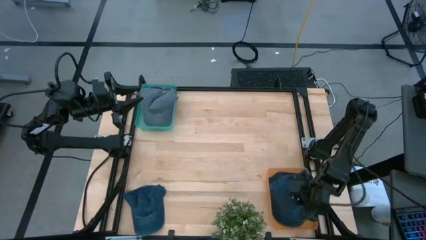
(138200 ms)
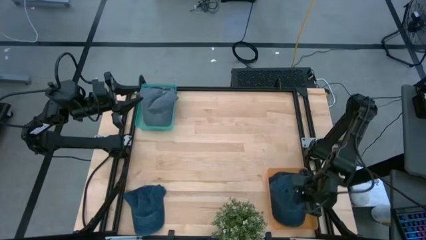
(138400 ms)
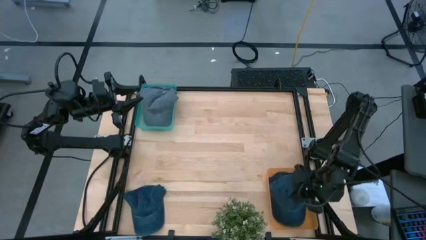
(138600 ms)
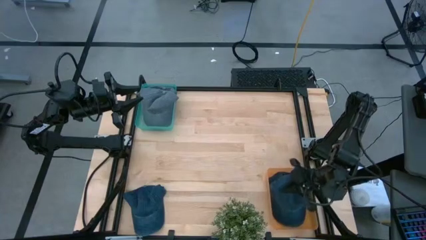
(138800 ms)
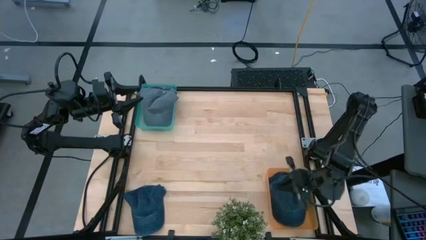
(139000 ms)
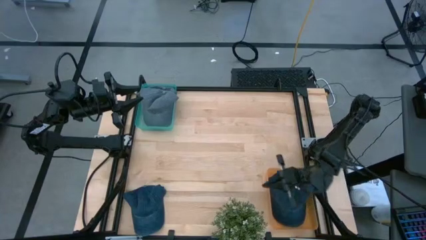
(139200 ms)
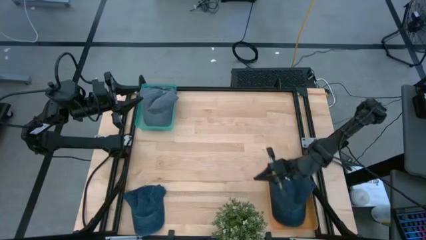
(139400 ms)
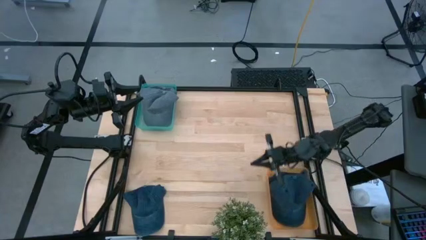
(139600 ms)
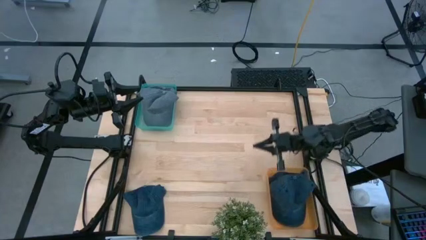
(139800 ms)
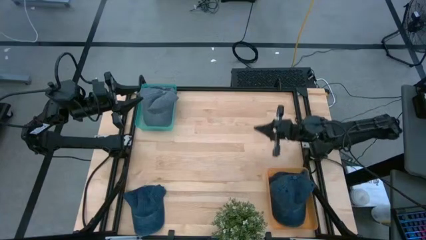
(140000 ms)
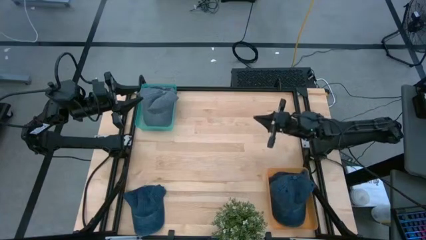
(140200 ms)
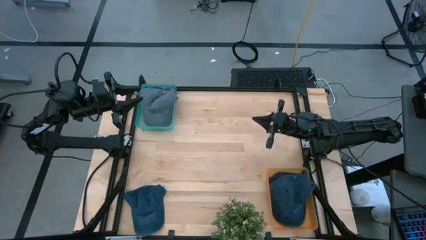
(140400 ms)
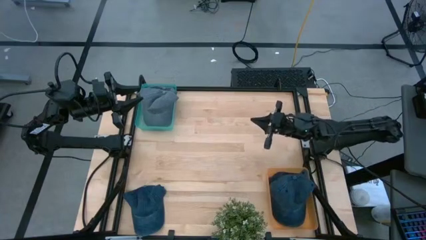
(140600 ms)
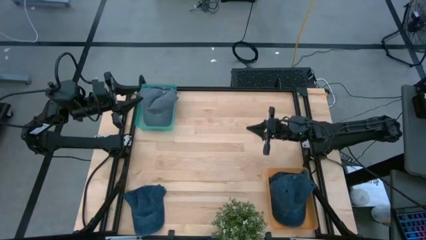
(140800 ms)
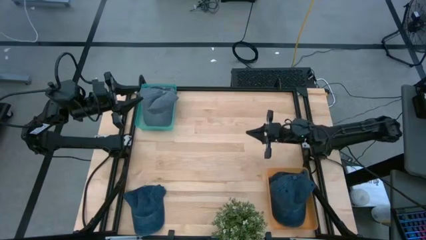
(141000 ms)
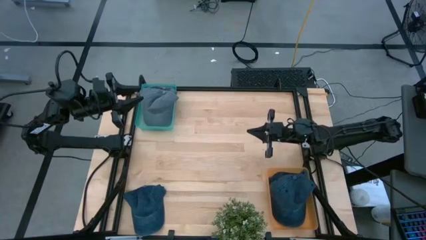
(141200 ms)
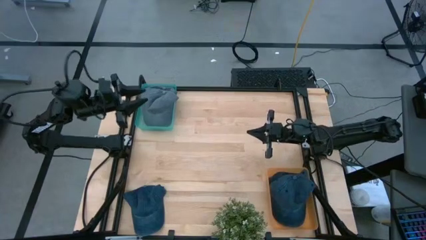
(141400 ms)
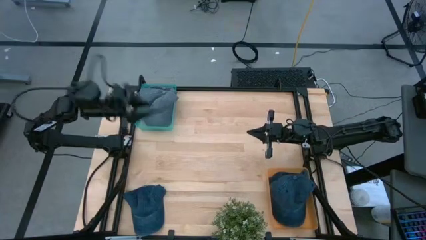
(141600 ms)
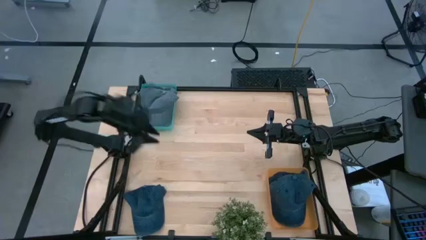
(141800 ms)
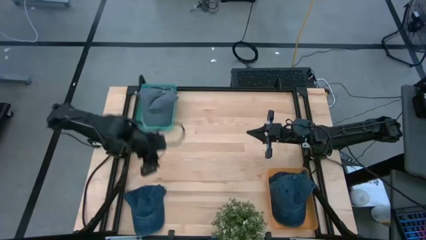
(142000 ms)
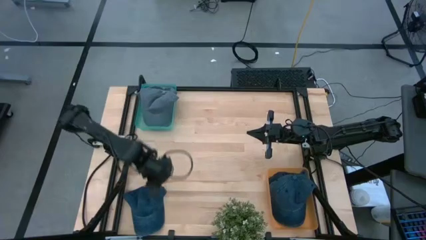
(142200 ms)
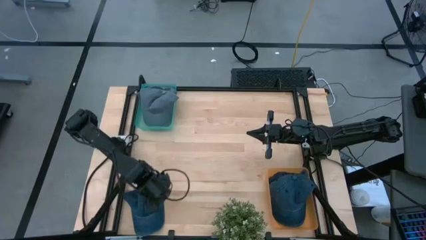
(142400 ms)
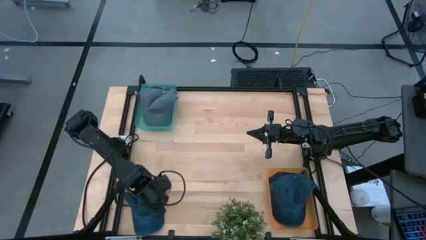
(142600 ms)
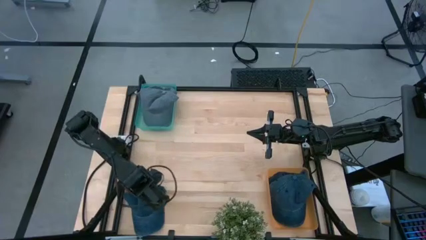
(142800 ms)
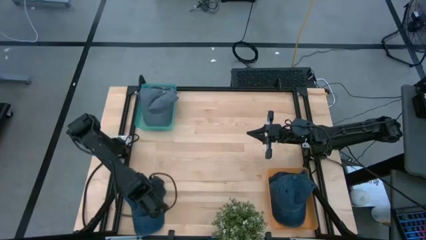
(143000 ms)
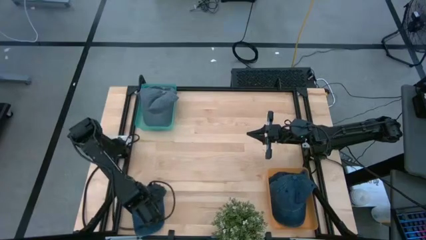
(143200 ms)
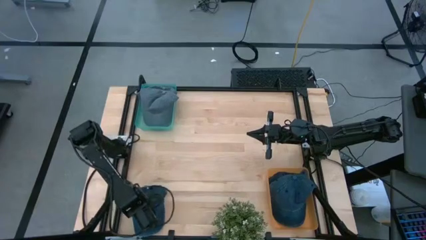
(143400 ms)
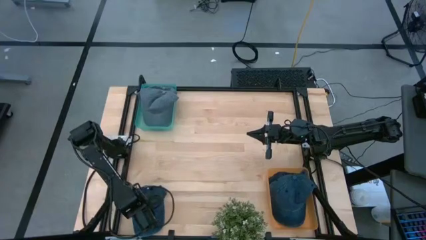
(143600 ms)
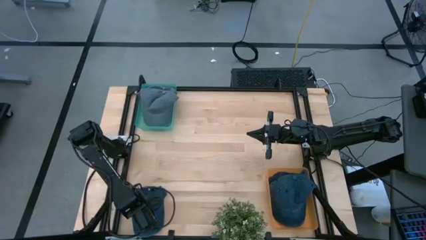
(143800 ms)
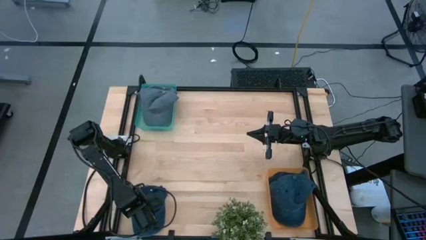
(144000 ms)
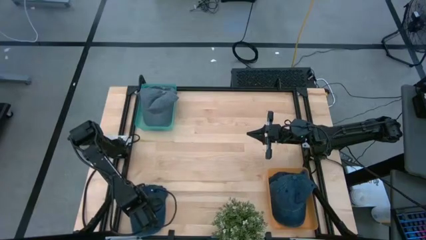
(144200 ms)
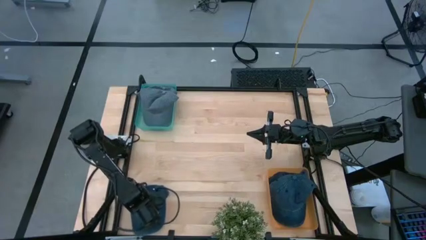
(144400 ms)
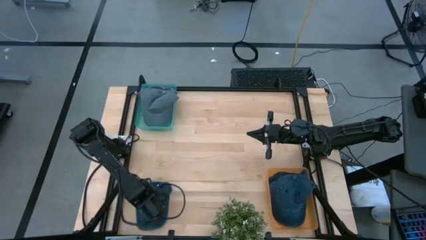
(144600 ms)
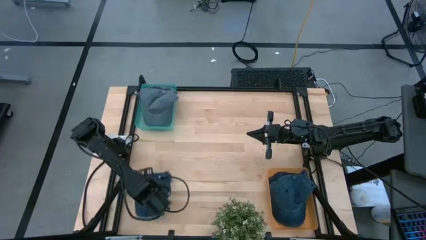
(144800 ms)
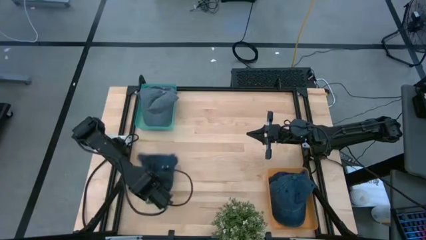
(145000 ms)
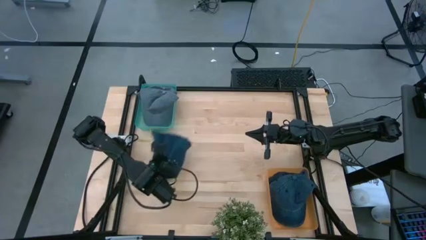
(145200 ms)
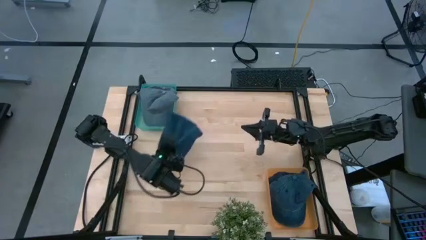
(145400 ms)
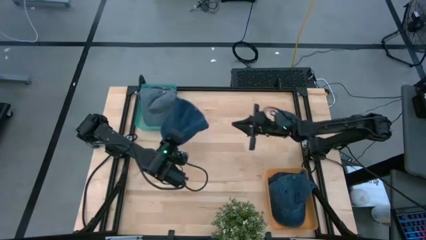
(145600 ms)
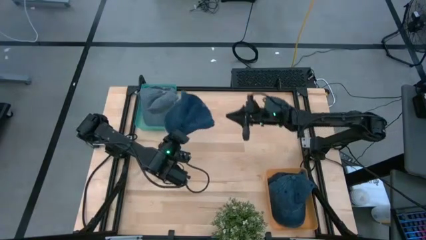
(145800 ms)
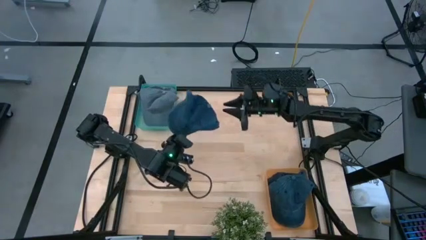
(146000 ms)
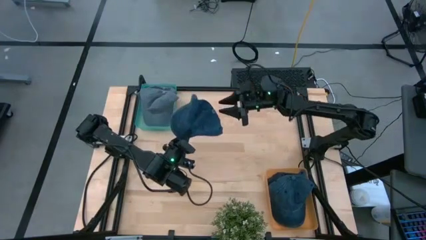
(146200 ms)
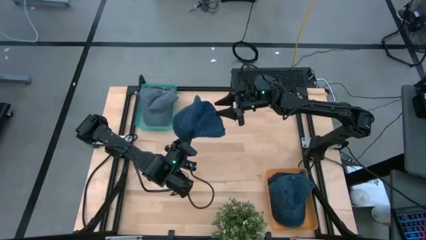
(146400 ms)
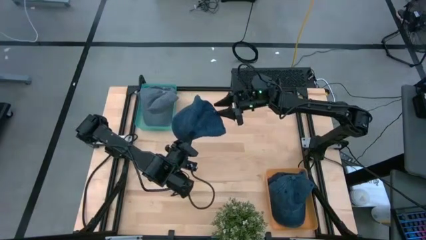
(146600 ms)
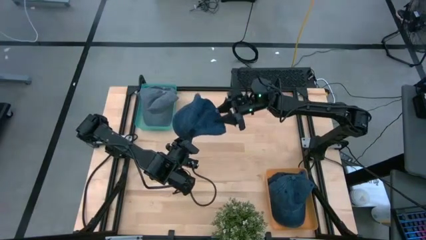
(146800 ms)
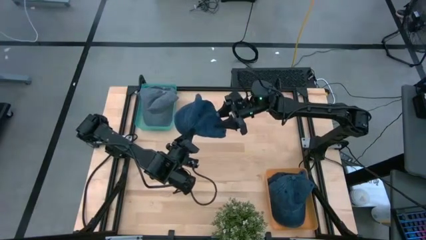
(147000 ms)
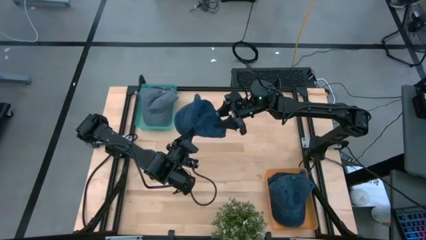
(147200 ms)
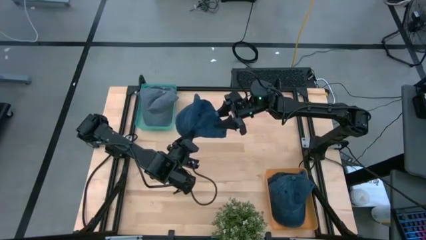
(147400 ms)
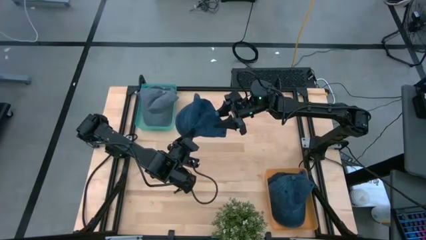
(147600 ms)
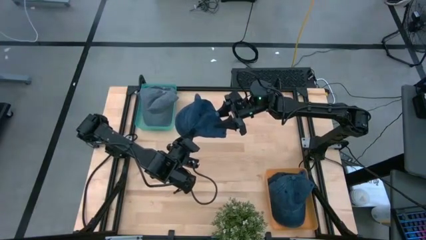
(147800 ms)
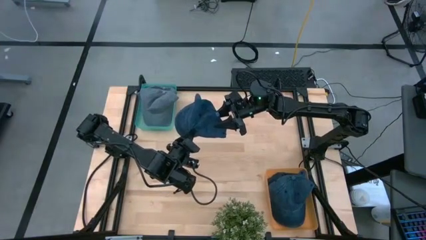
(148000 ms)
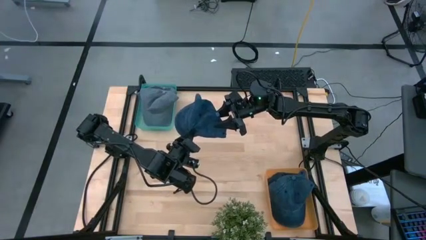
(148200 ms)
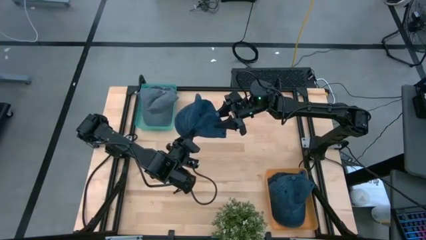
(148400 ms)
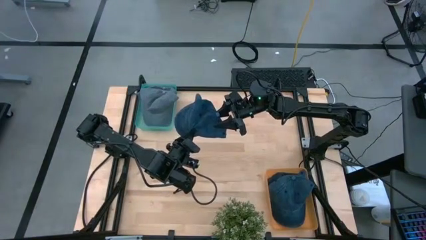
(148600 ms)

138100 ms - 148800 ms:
Task: Pick & Place hat
Put the blue cap into the orange bin

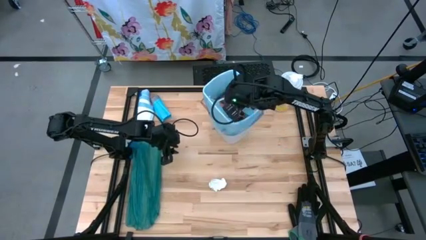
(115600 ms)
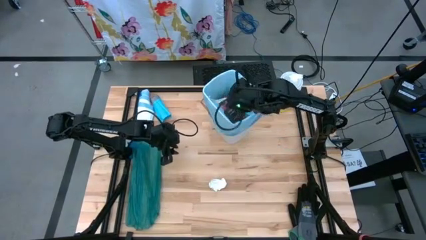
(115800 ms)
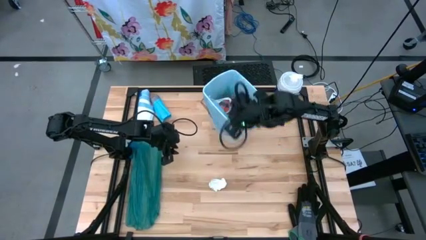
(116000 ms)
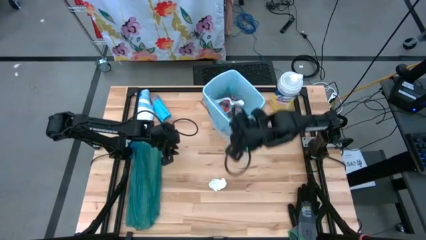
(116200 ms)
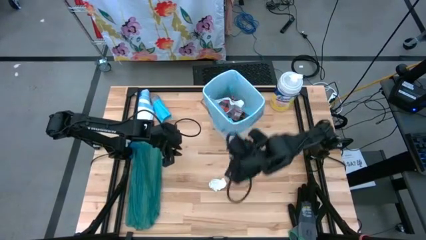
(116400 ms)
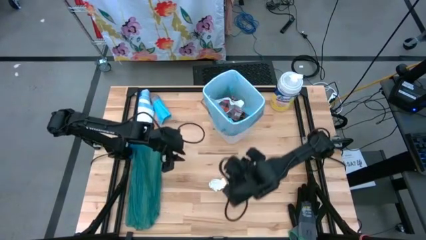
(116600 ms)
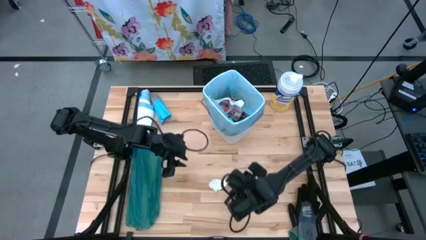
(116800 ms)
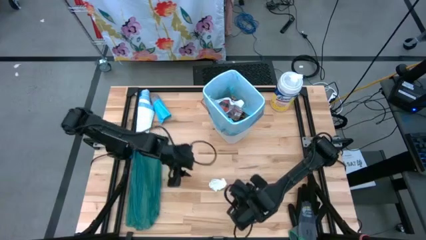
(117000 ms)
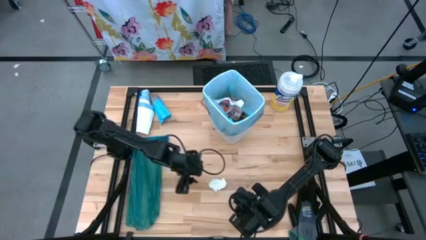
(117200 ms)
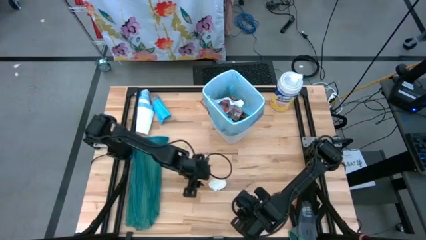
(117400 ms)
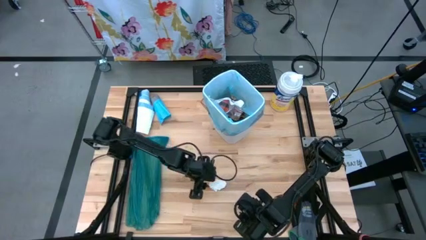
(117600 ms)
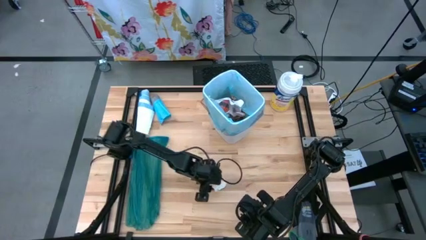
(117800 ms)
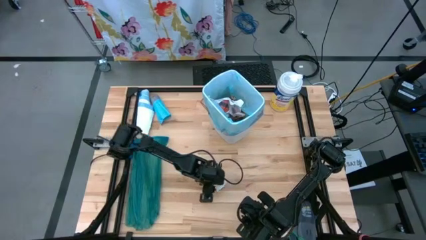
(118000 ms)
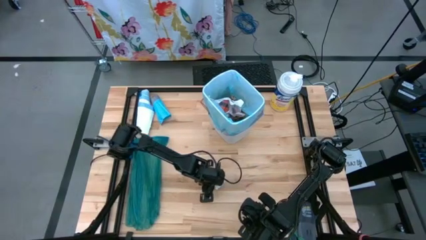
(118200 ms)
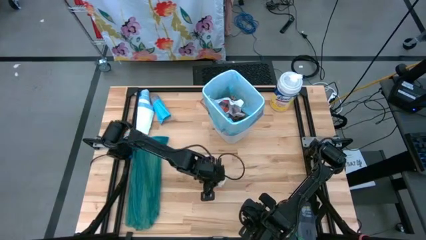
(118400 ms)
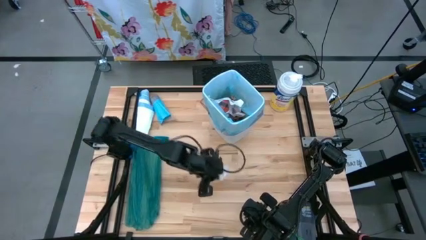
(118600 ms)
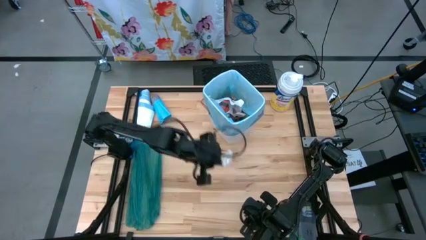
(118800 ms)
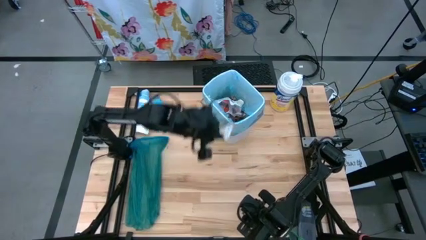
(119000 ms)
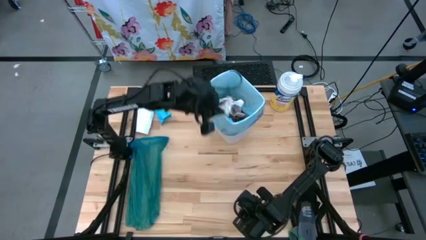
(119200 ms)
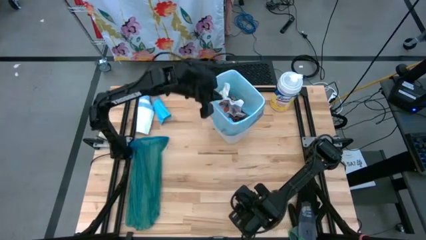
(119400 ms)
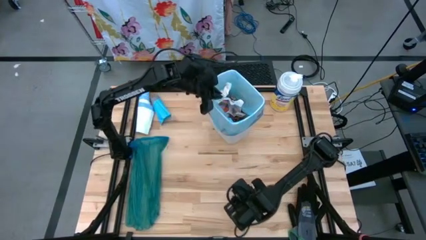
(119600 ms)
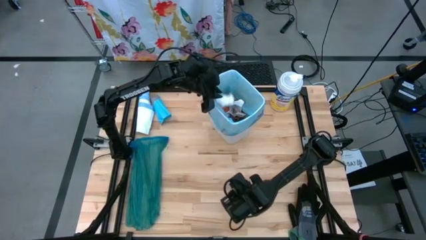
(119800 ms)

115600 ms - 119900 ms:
Task: place trash/remove bag and relplace
Put the white paper into the trash bin
